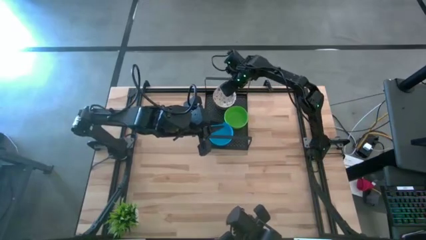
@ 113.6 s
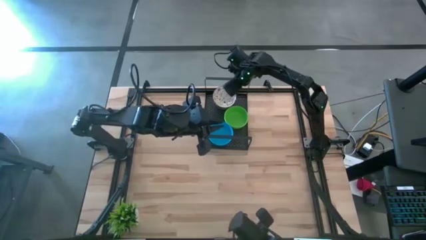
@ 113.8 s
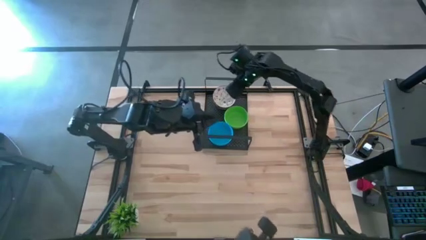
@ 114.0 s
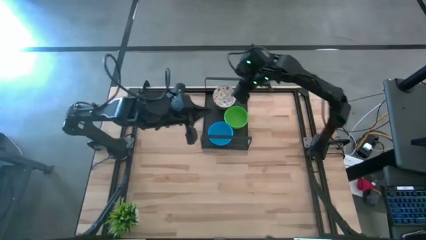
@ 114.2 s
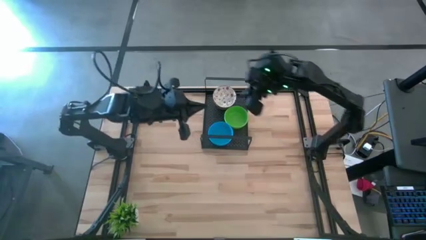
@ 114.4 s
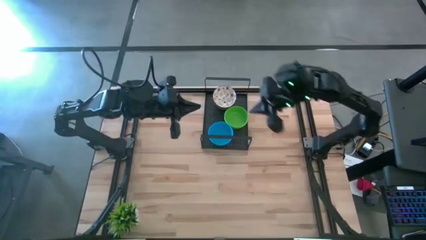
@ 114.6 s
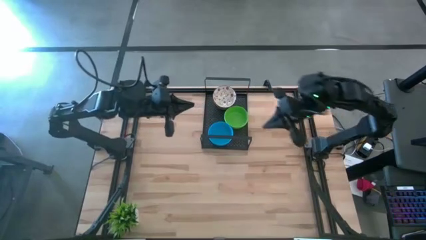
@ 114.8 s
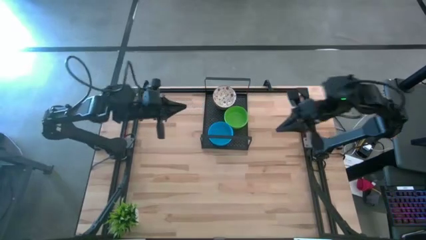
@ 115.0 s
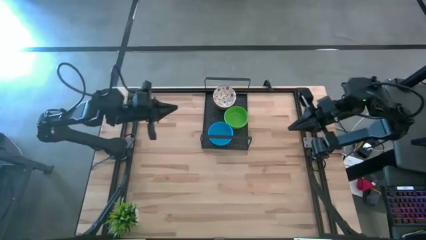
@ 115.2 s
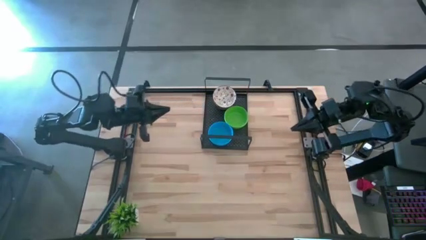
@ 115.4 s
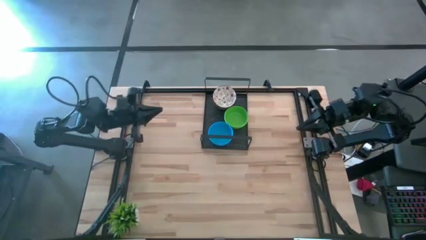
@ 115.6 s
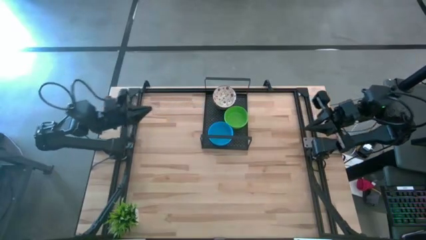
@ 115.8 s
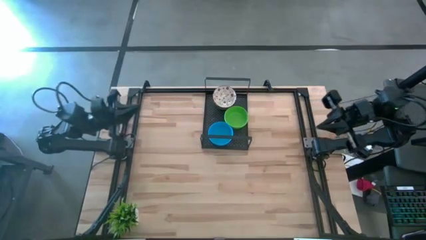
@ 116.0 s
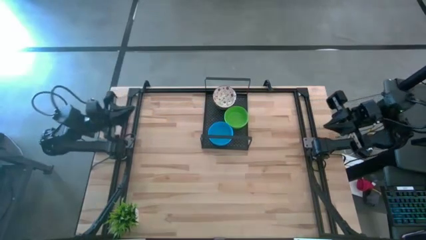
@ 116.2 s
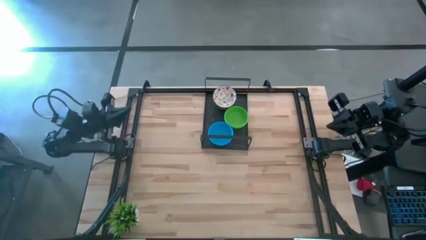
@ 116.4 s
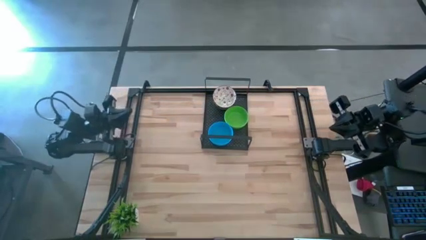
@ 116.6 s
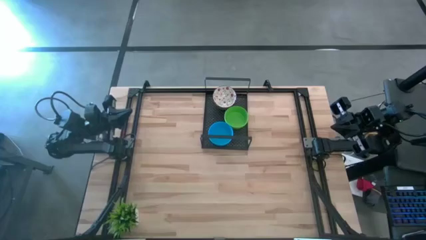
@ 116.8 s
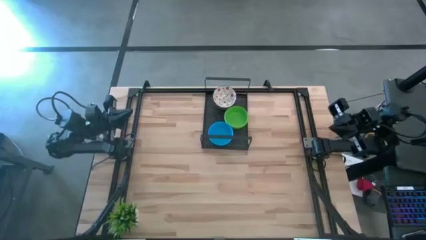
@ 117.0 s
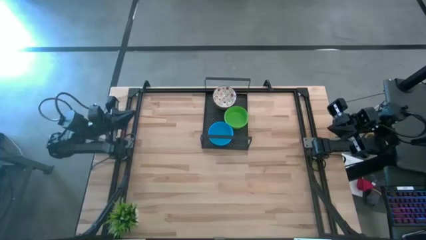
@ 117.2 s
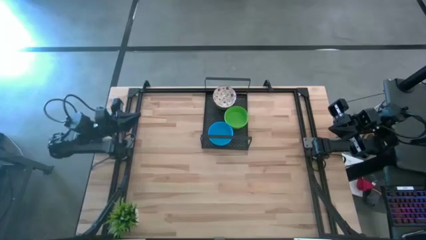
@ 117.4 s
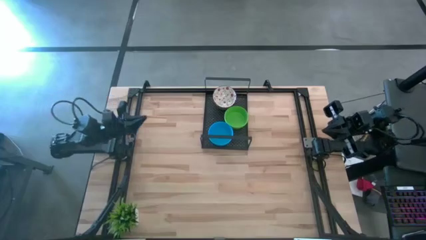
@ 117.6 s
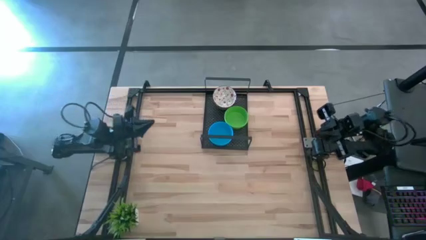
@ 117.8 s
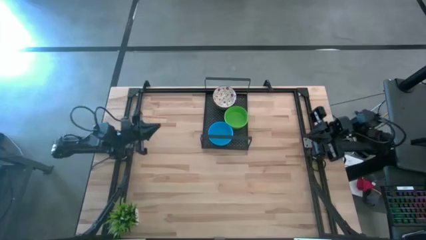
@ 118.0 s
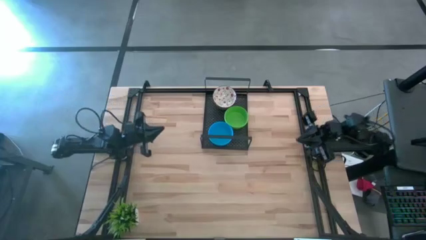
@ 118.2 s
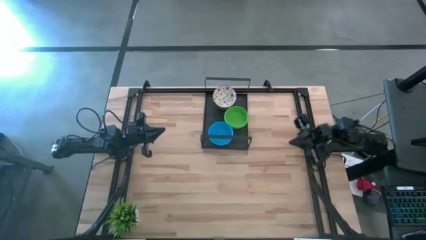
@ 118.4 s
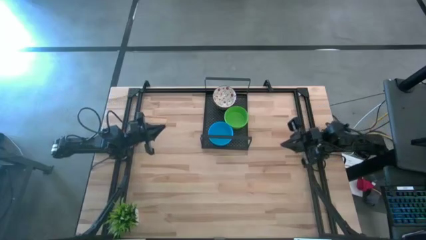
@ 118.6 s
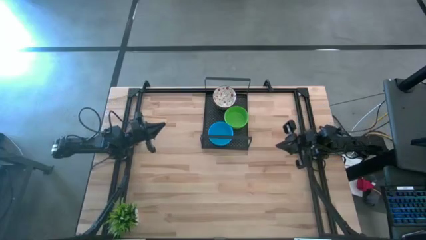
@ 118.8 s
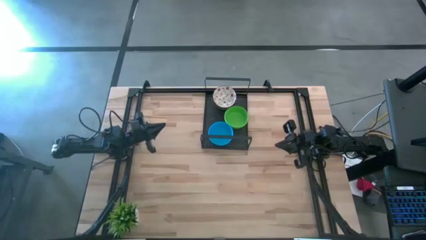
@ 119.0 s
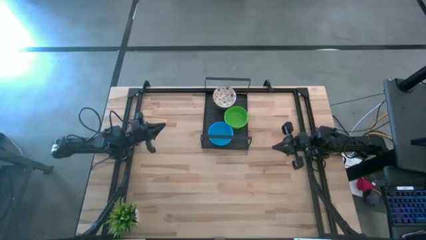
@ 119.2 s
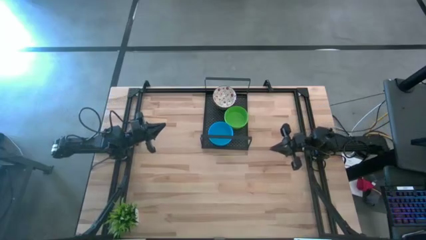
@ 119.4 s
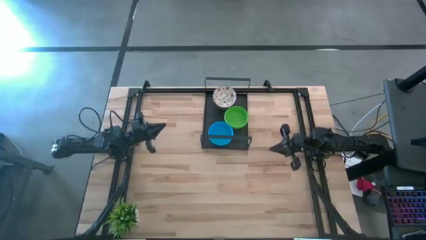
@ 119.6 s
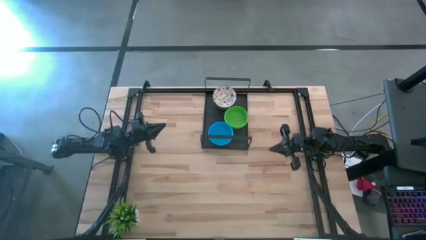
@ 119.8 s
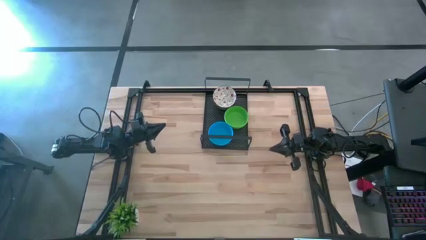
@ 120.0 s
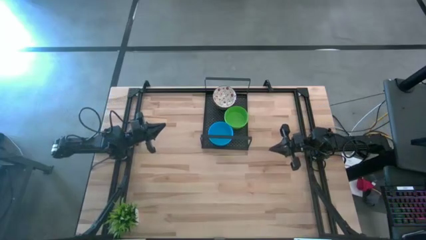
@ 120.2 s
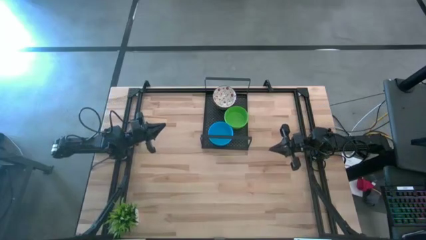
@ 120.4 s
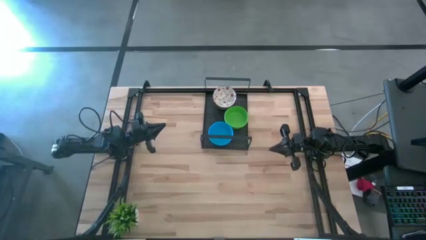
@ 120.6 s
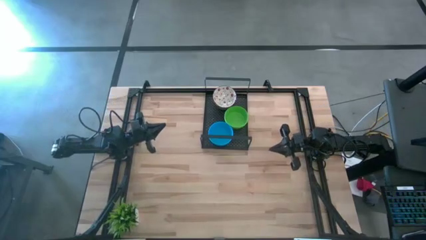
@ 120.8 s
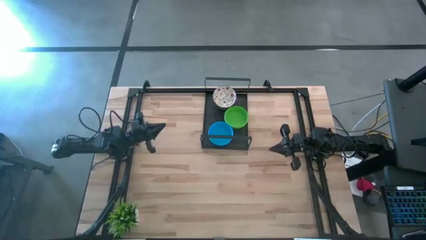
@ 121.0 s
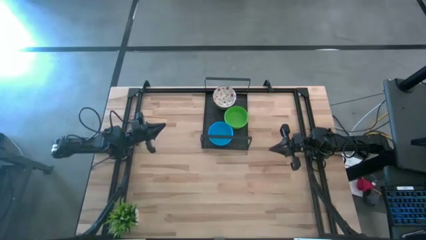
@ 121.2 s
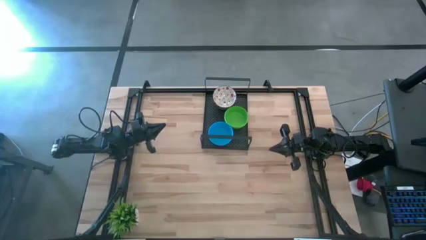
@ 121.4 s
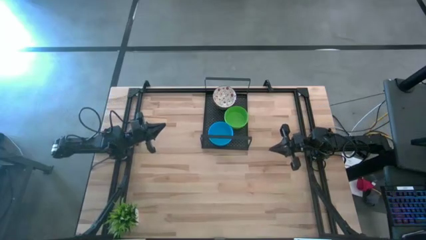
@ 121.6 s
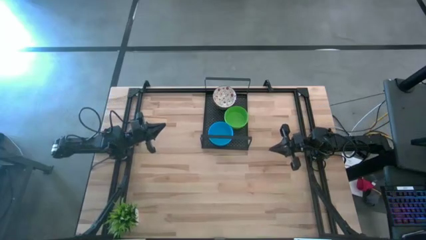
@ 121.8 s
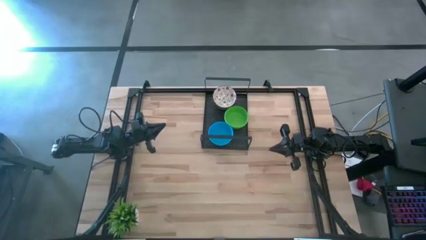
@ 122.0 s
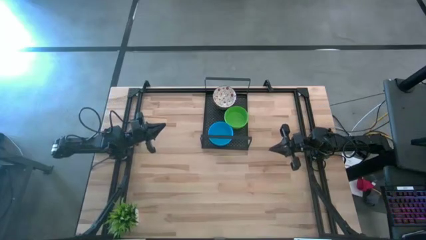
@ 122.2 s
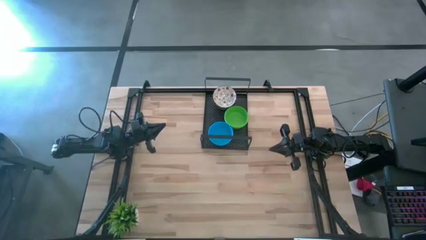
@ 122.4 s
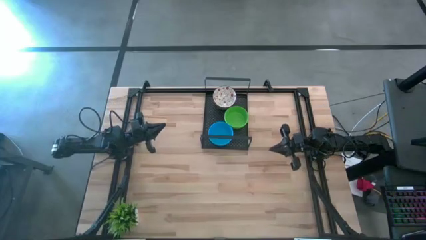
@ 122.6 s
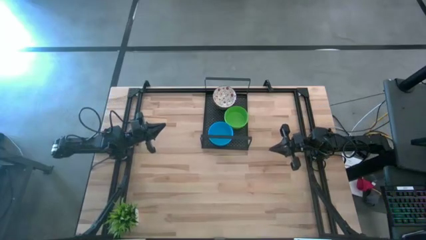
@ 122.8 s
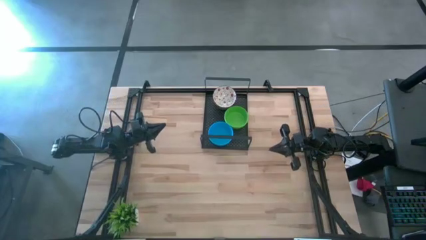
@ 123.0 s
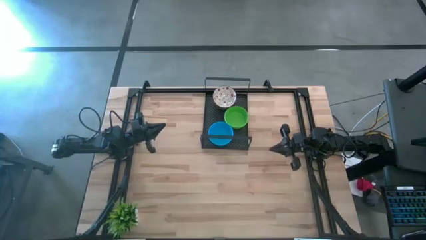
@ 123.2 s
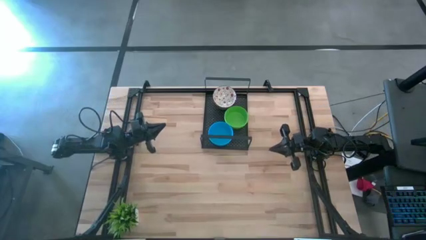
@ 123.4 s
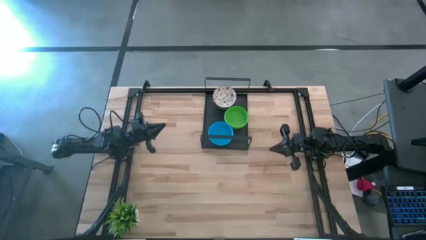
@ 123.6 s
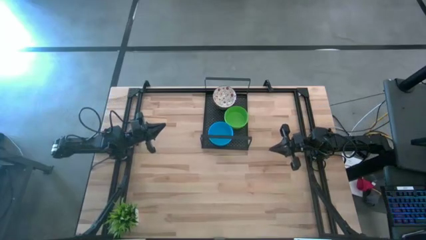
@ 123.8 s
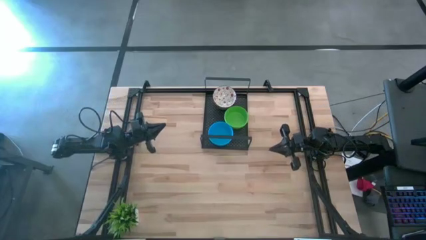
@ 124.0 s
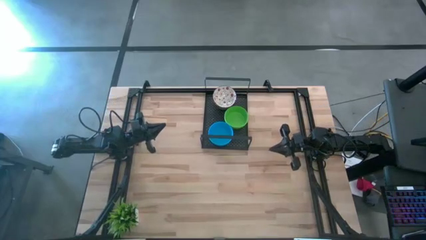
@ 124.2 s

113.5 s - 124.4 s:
Task: Pick & Place Mini bowls
Return to Home Position

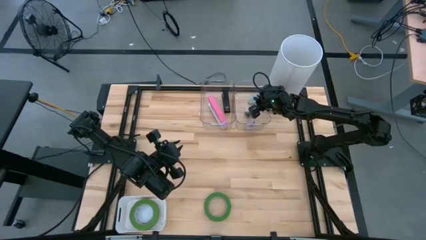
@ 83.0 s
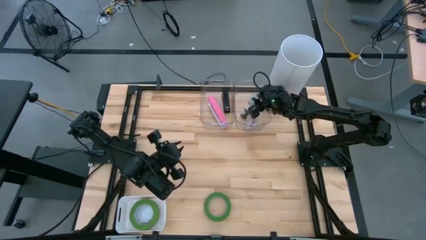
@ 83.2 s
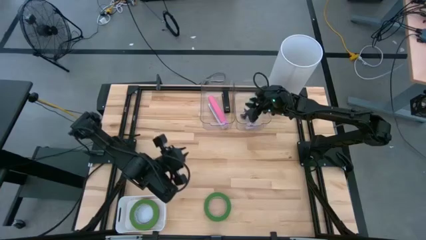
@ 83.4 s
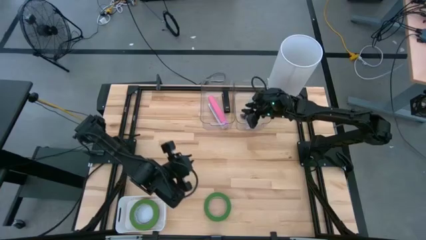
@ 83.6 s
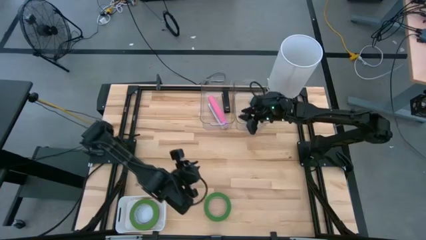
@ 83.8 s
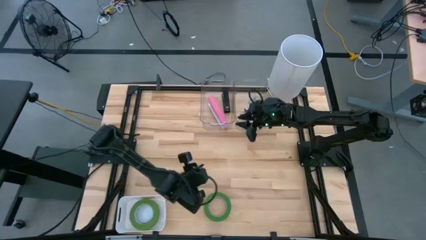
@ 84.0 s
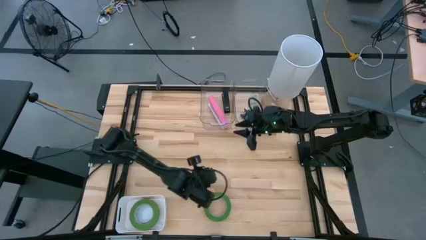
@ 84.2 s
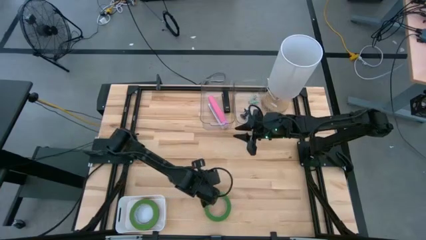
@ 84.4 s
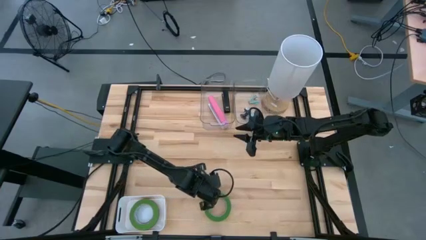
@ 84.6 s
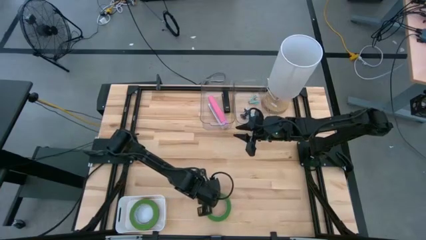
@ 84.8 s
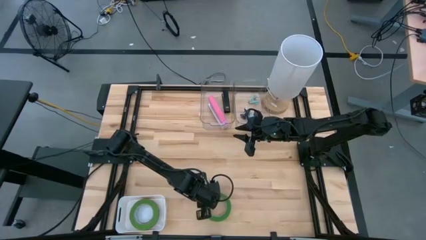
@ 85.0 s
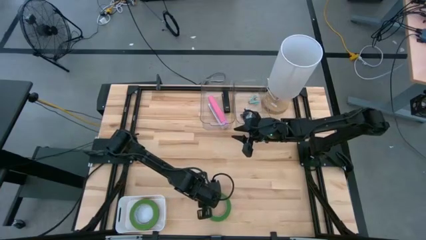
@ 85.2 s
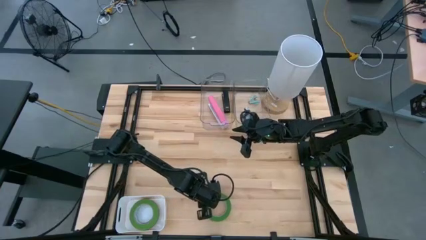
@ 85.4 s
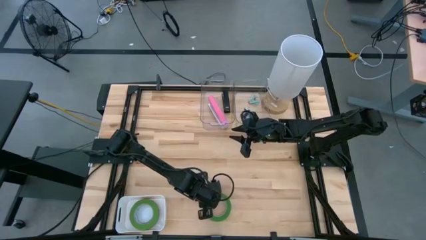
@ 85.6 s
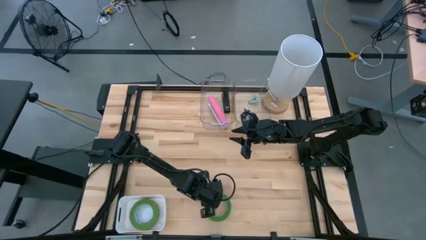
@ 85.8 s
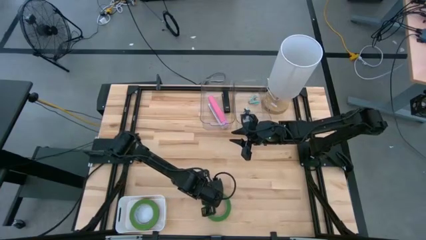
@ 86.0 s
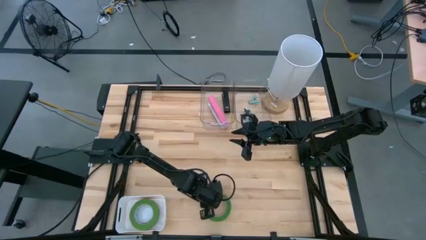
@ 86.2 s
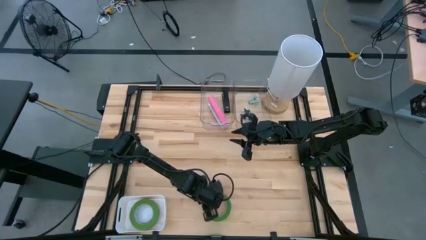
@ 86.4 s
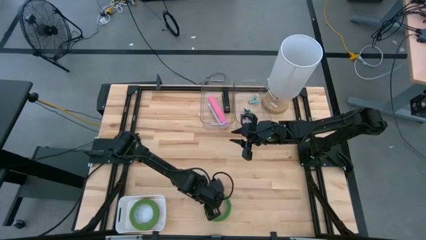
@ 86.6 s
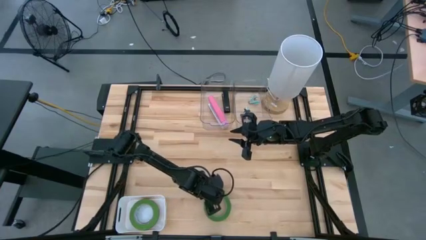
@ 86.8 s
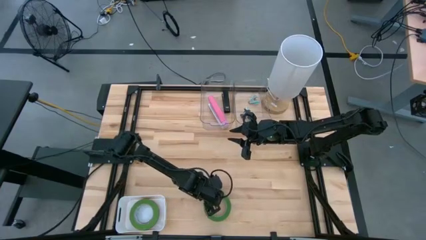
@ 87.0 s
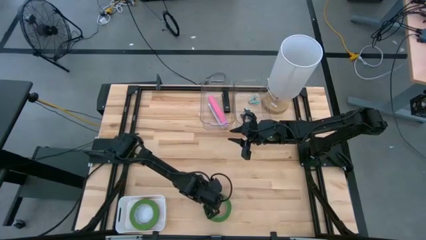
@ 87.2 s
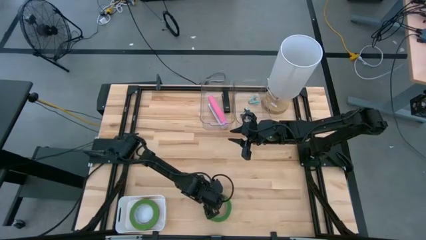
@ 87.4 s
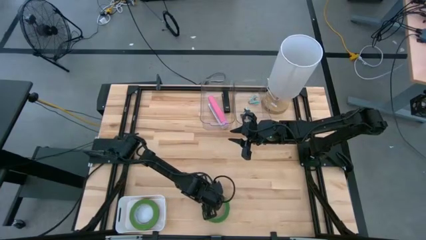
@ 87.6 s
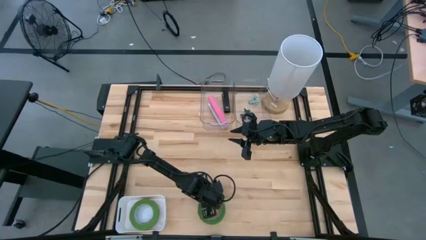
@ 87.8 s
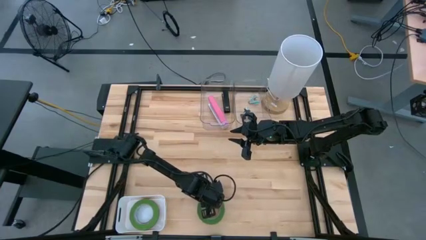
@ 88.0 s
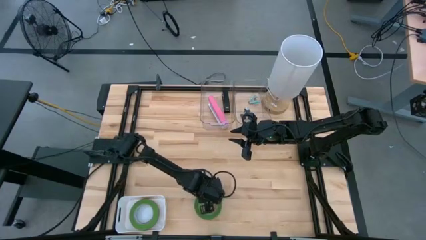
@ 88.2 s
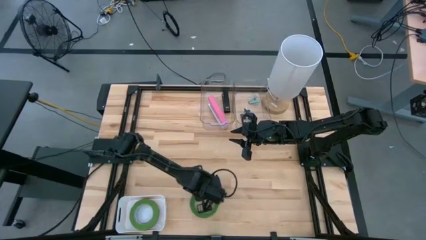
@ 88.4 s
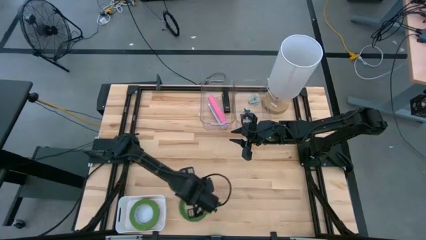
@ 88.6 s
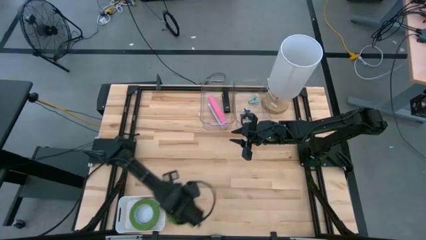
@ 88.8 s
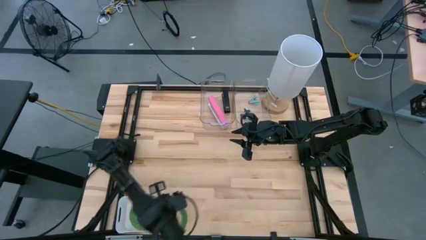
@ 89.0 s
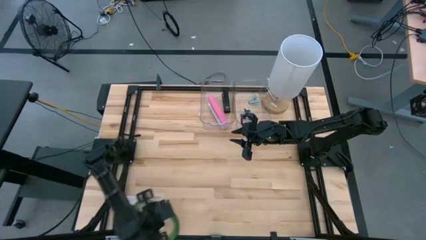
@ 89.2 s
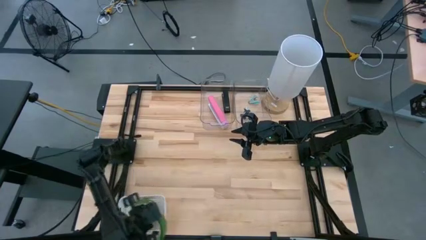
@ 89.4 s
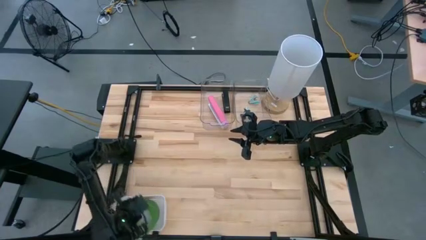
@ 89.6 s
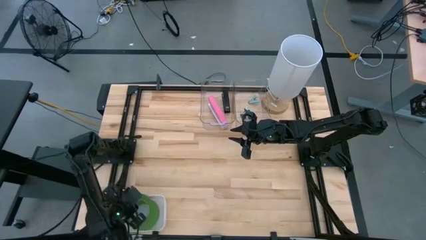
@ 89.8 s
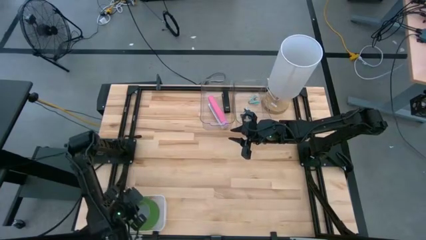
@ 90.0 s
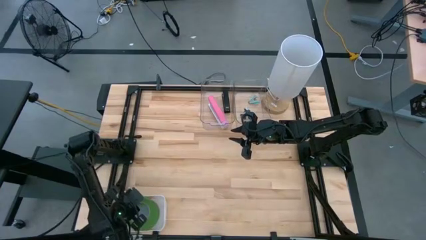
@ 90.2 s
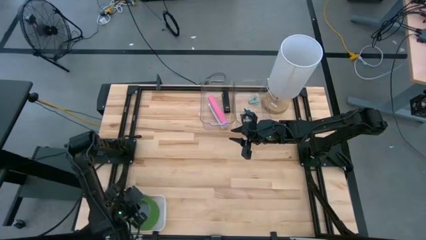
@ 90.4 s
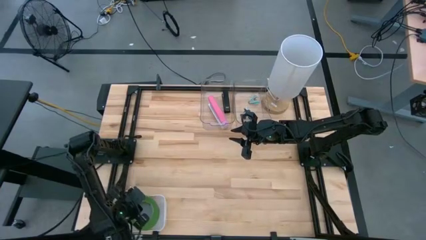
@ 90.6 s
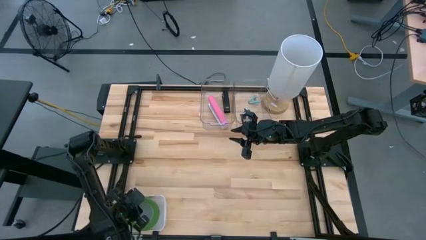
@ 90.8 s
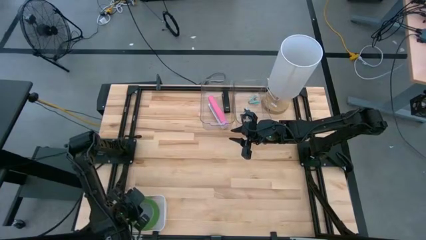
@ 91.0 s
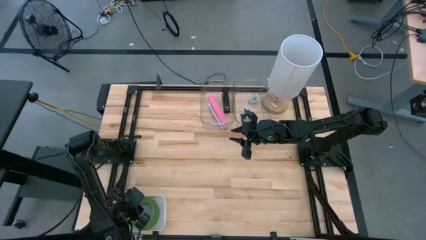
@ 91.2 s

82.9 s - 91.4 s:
Task: Pick and place Stapler, Stapler remover, tape
Put the green tape into the white bin
